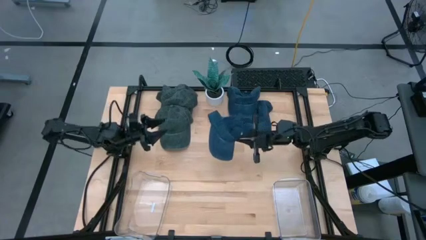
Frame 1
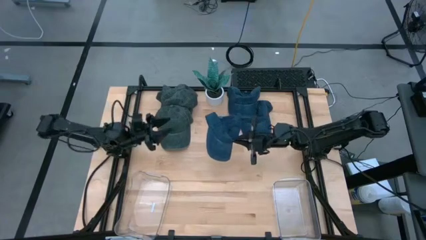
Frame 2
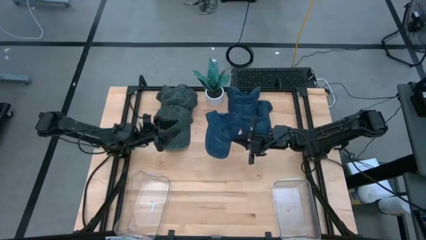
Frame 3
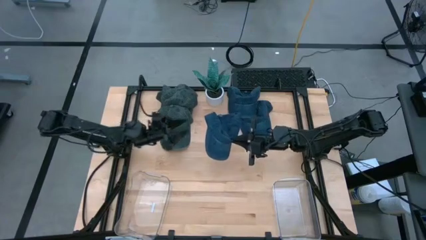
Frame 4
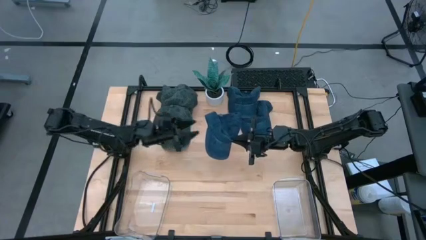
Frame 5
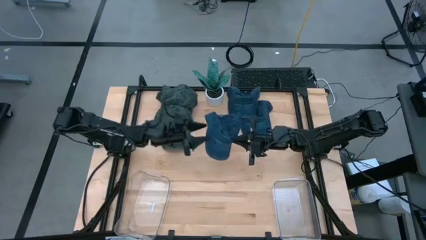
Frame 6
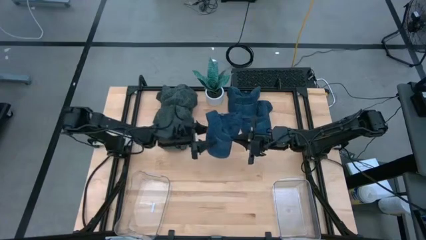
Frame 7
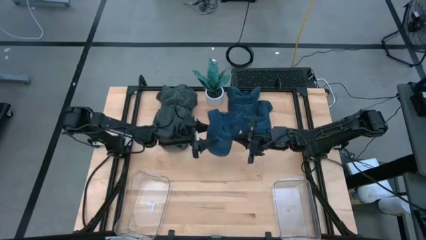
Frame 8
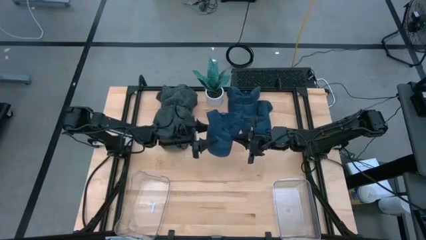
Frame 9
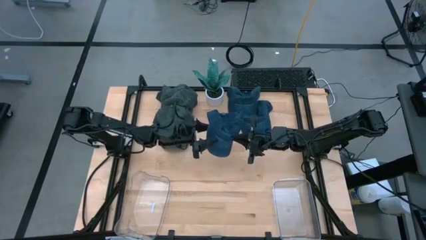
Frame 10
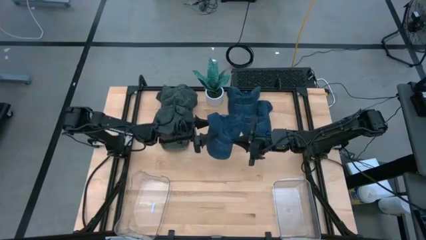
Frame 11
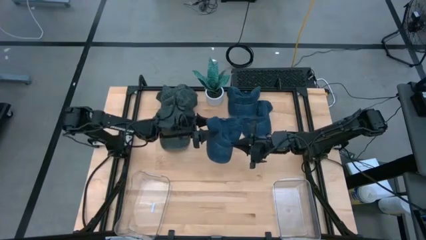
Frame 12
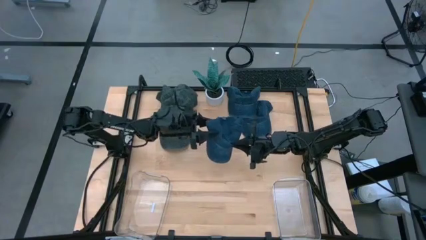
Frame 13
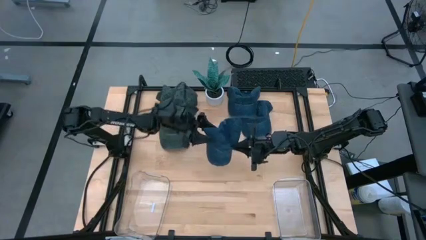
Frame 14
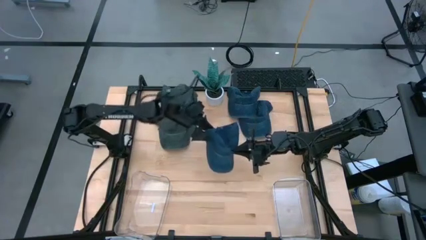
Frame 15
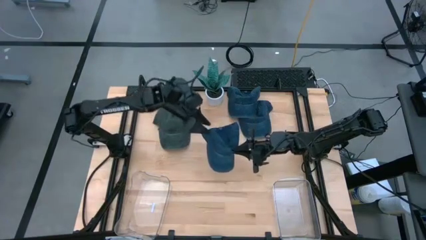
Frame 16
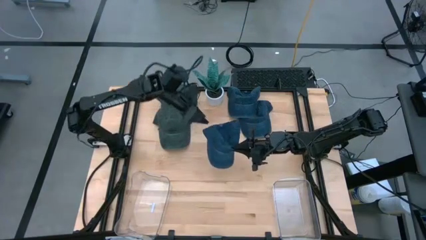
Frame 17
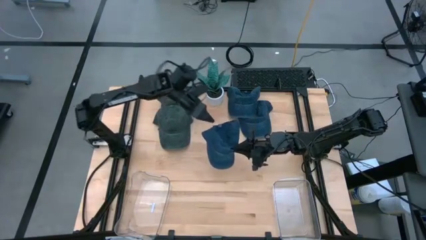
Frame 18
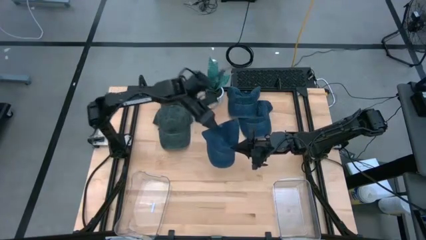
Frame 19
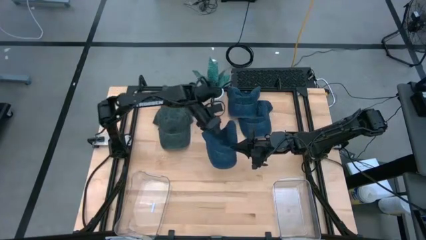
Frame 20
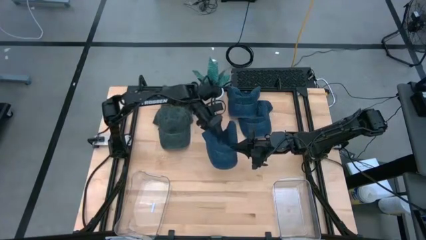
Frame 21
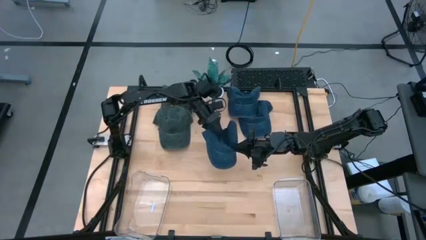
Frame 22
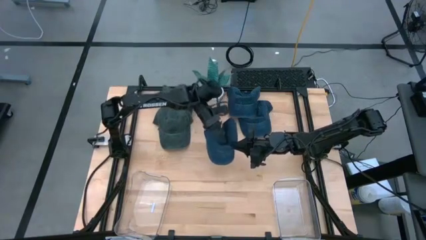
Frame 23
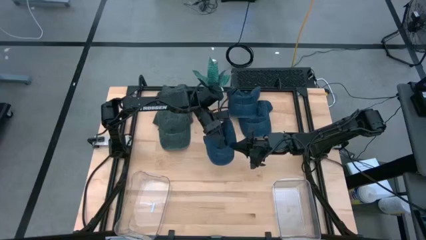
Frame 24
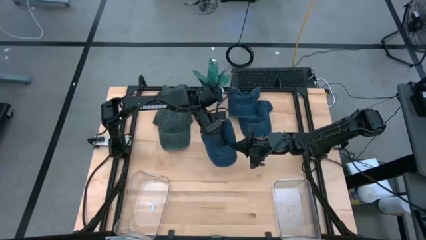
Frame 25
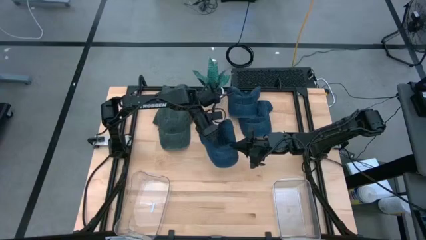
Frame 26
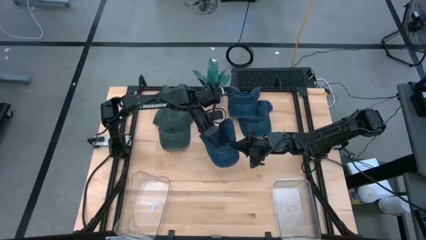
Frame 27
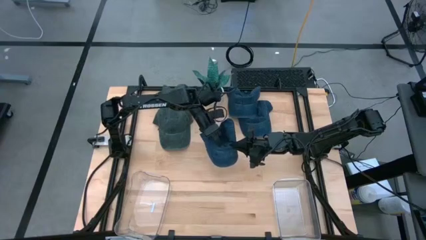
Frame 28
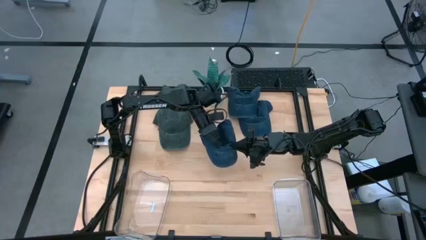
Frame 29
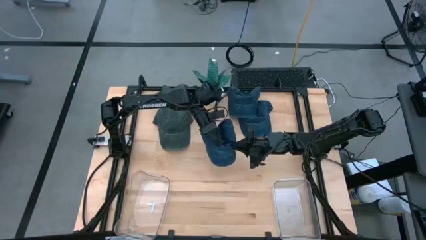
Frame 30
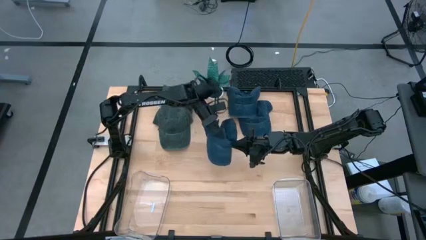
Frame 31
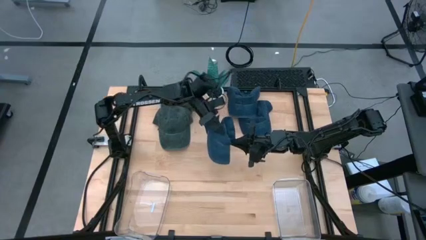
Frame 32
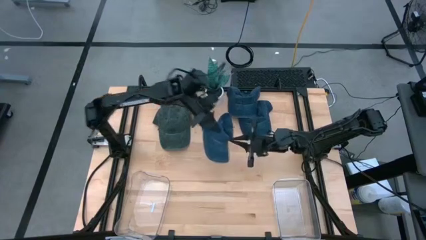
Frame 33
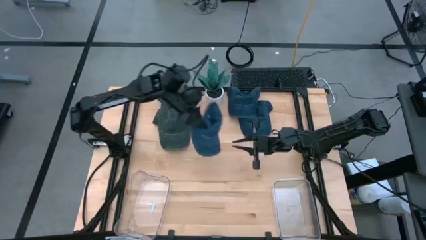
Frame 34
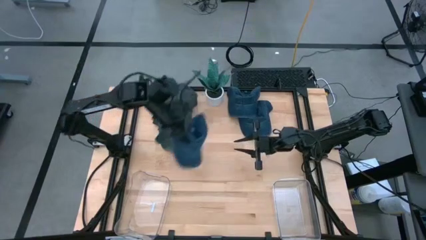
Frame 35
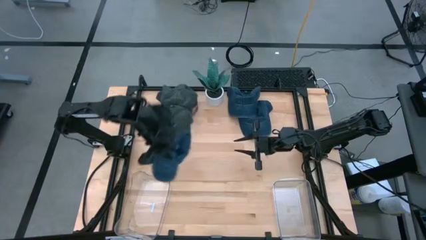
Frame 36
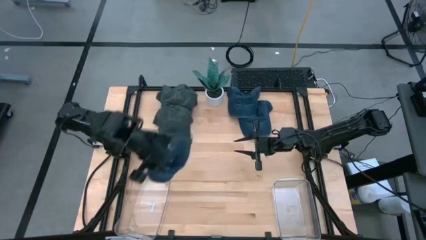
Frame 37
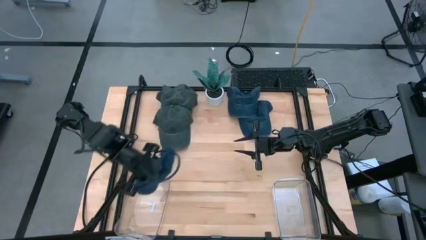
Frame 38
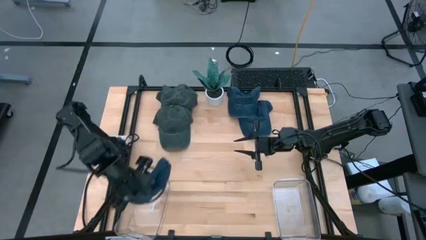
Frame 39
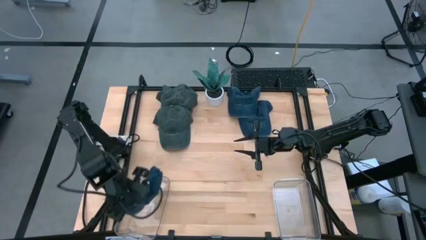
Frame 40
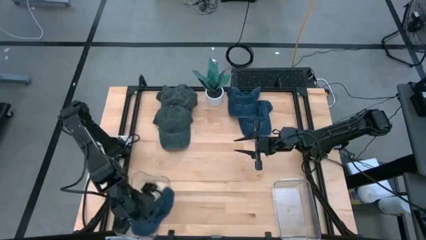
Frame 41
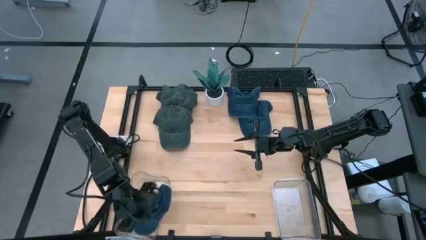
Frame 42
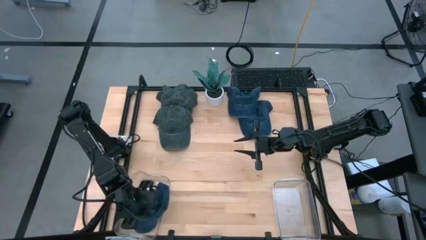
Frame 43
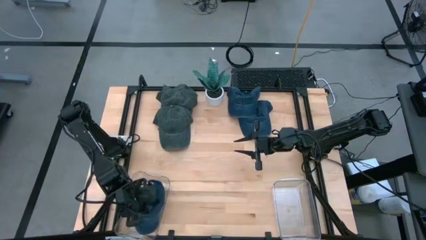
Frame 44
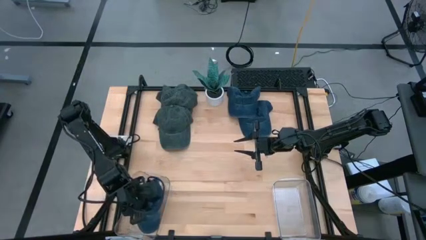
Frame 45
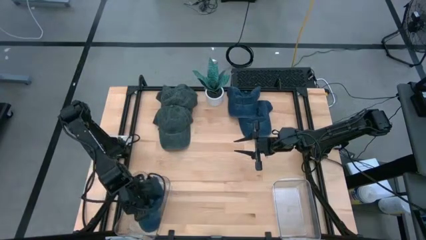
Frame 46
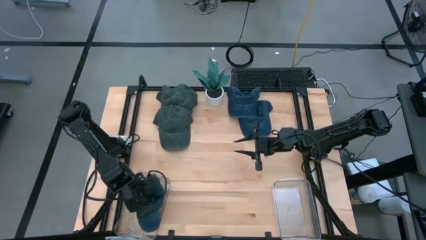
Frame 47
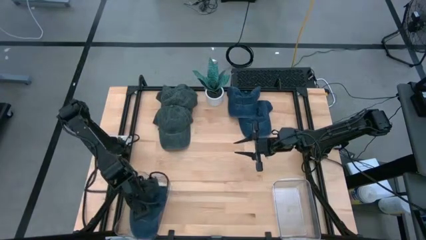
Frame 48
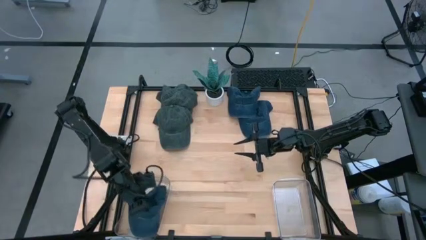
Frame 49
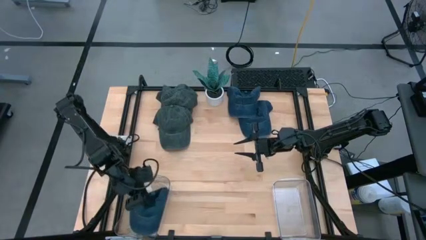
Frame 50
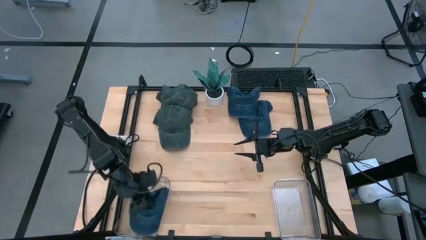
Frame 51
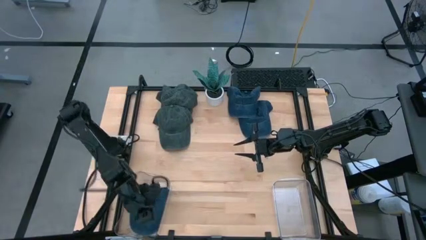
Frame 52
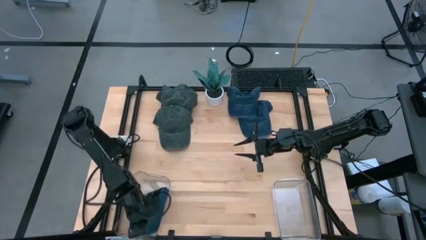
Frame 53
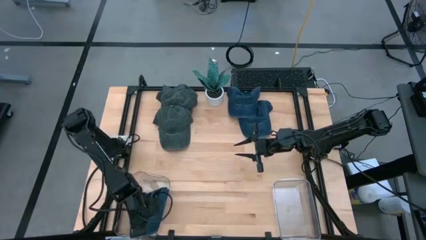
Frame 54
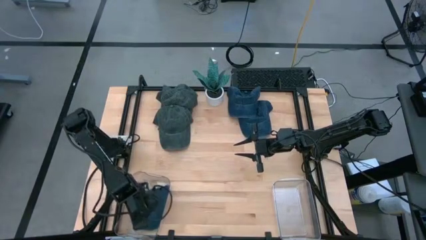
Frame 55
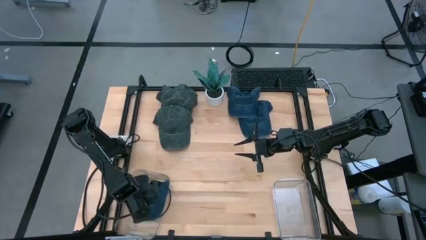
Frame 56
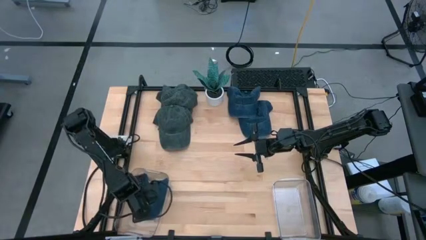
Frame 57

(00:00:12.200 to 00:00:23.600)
Task: Pick & Place hat
Put the bottom blue cap into the left transparent bin
